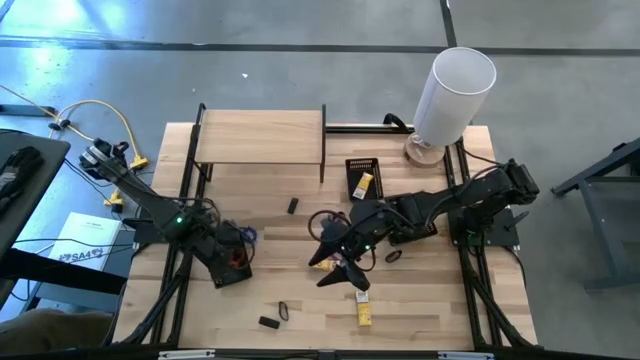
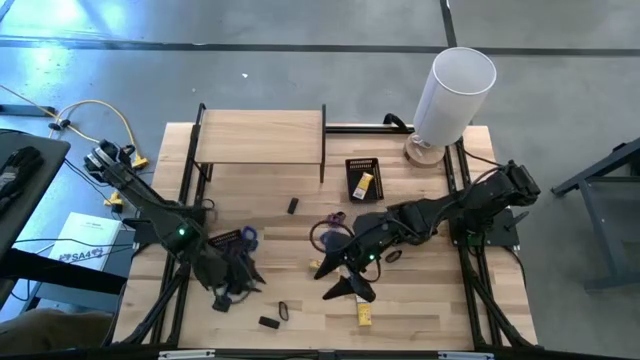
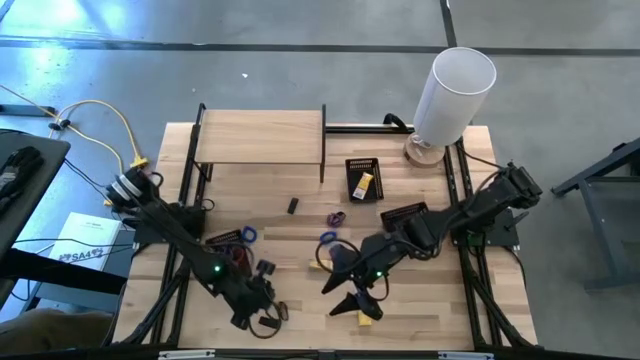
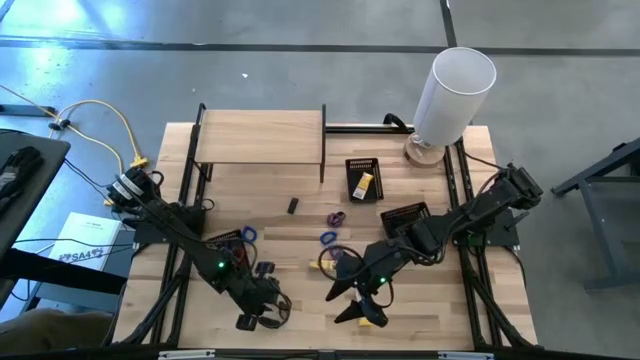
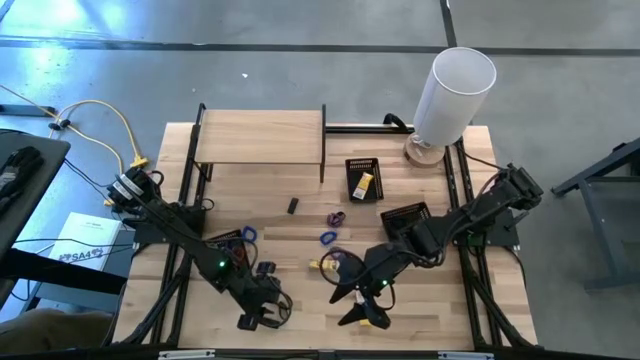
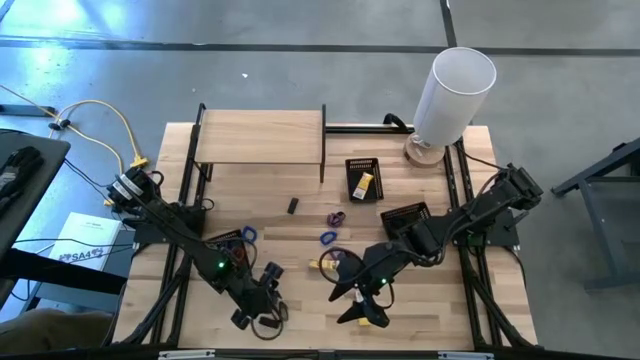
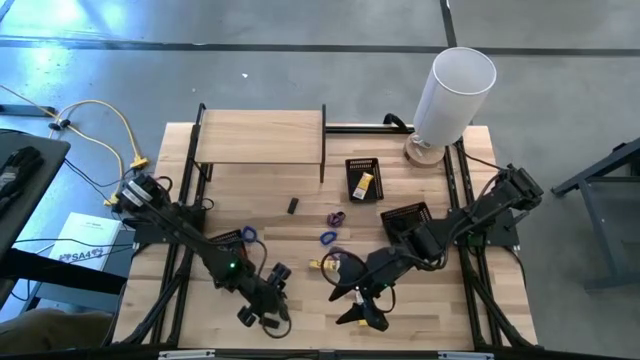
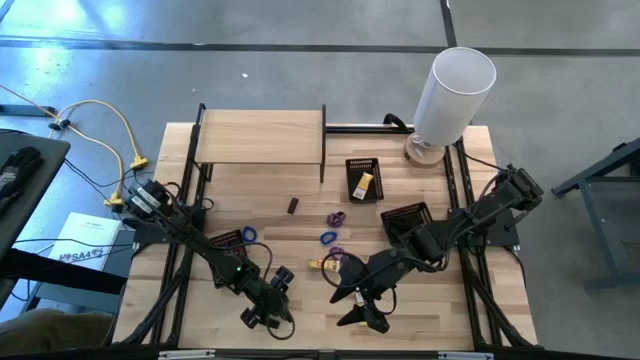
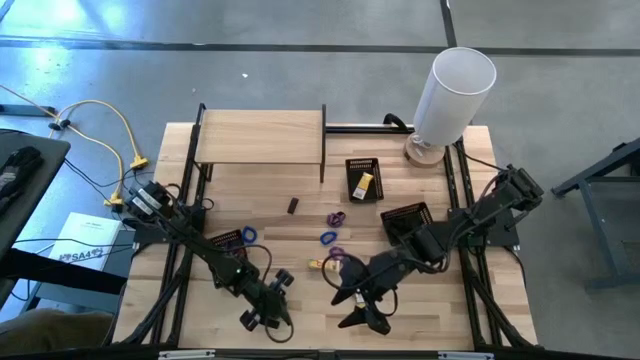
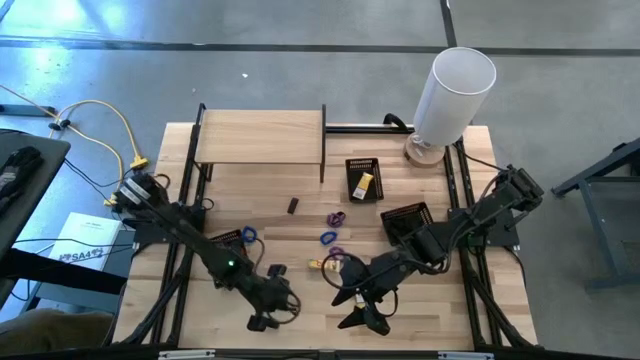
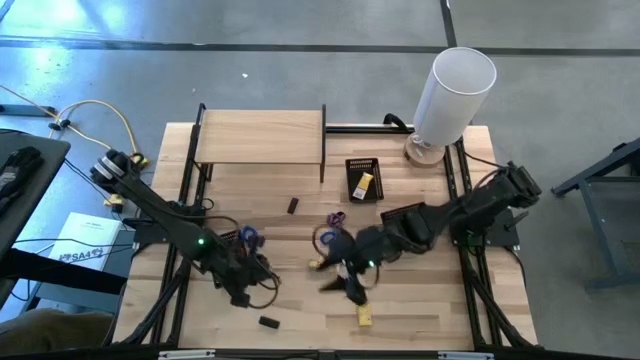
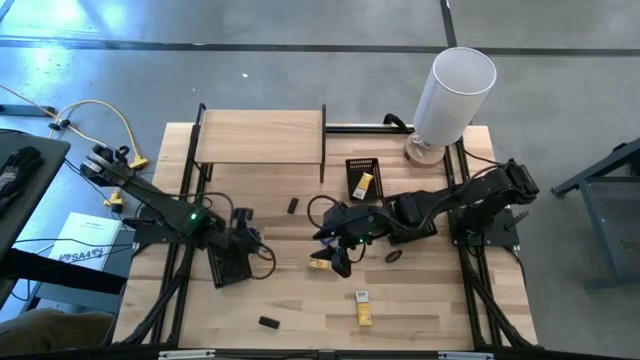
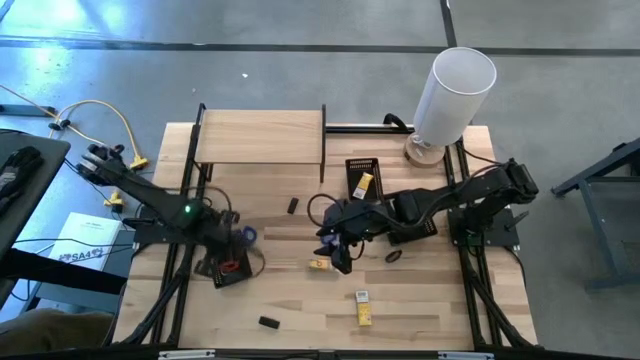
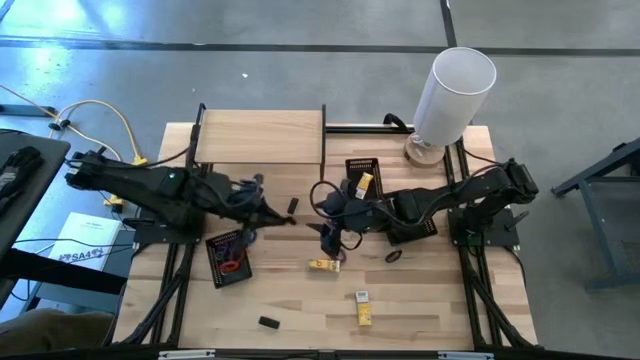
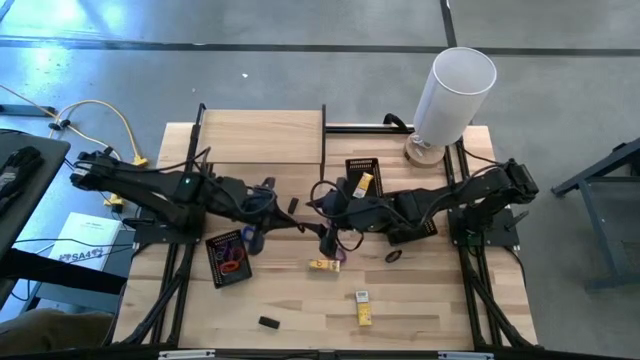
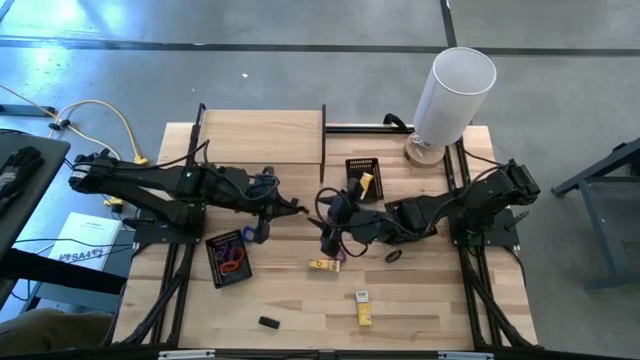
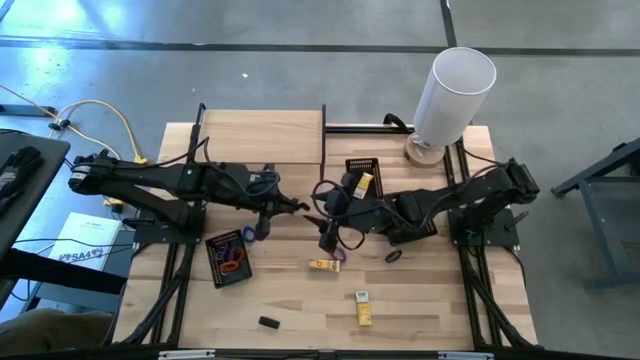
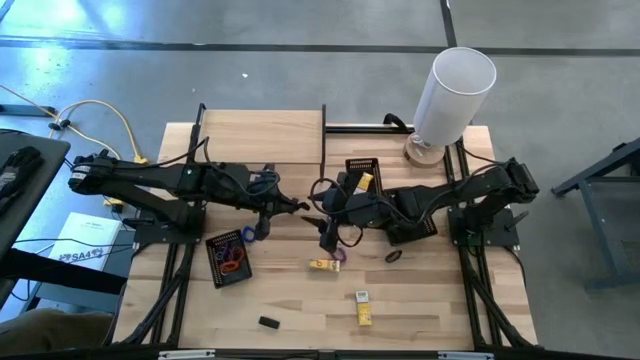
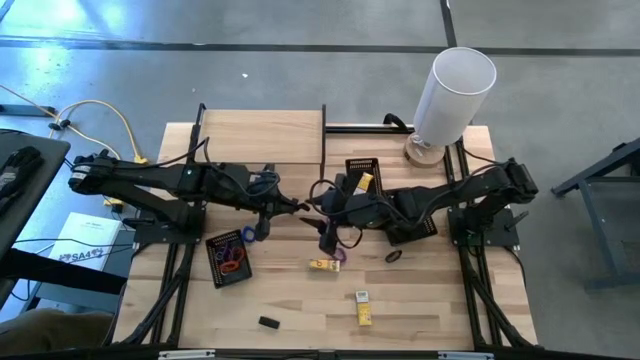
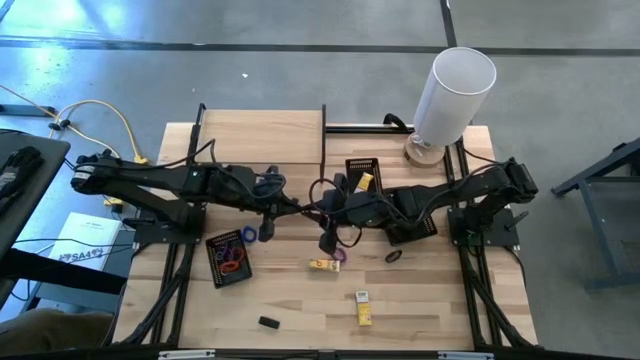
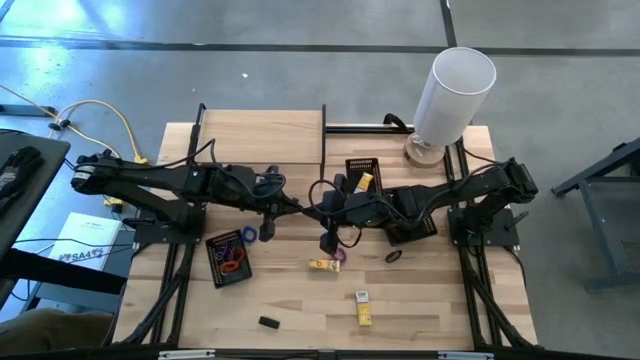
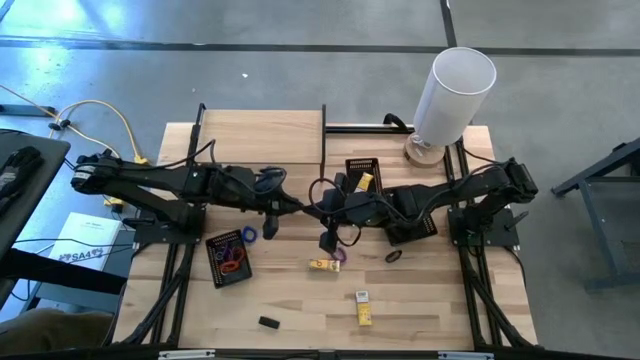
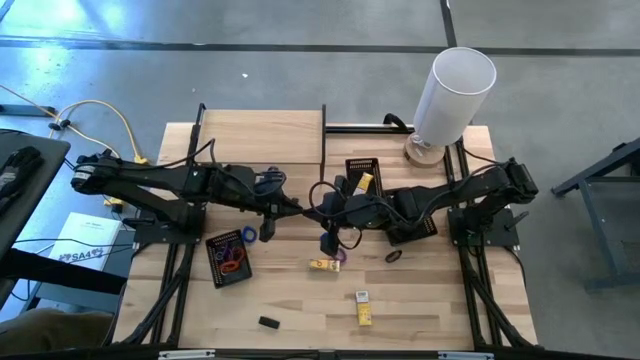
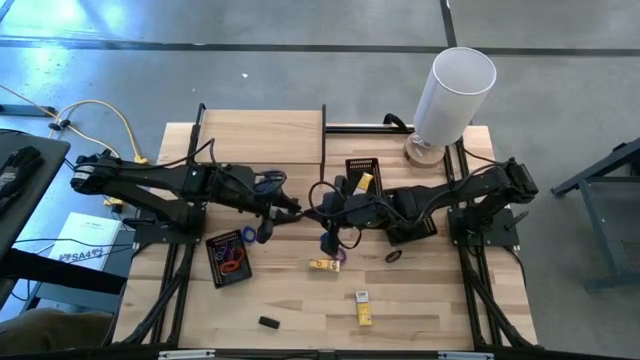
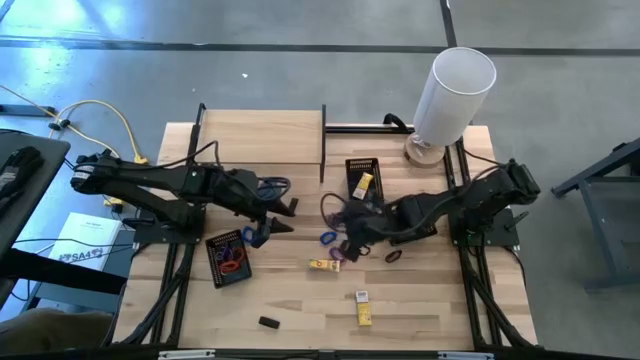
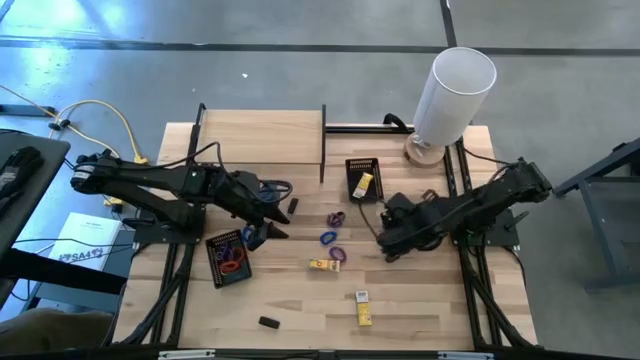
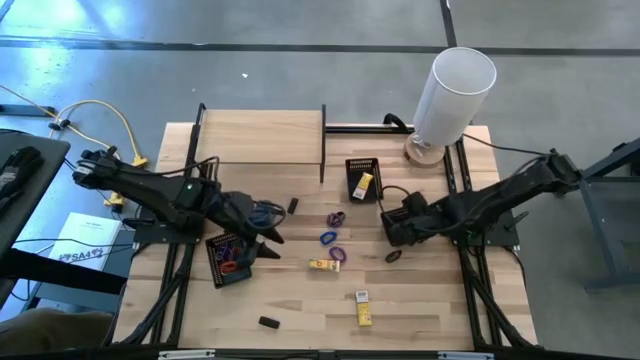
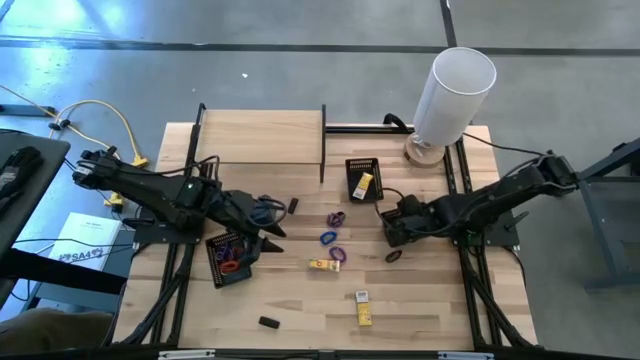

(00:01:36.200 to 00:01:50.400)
Task: Pick & Place Office Desk Supplies
Put the black rubberband into the bottom right black bin

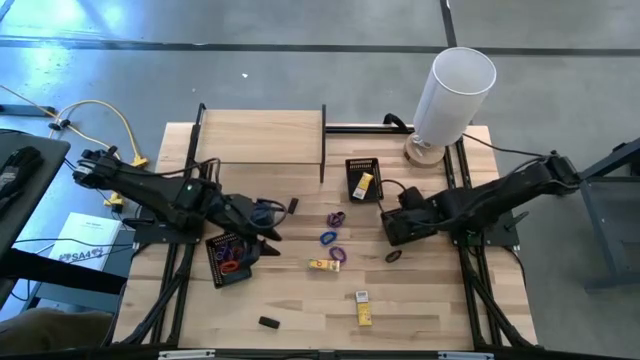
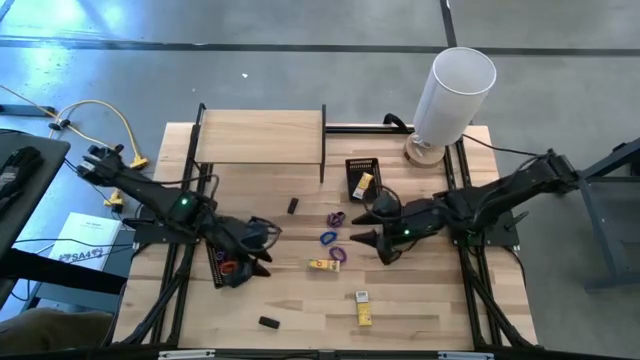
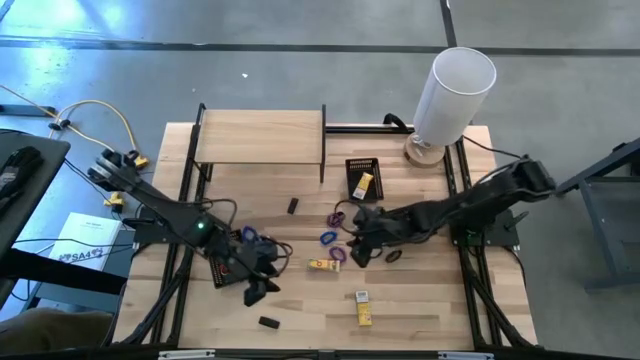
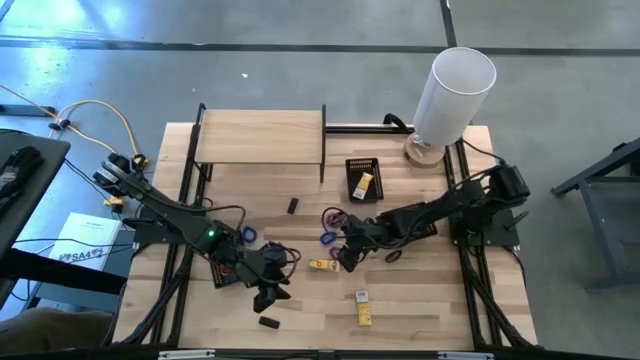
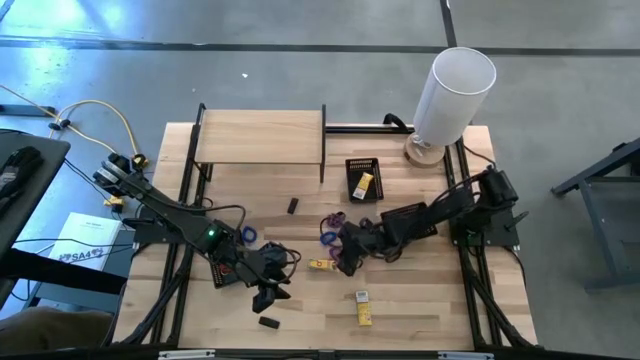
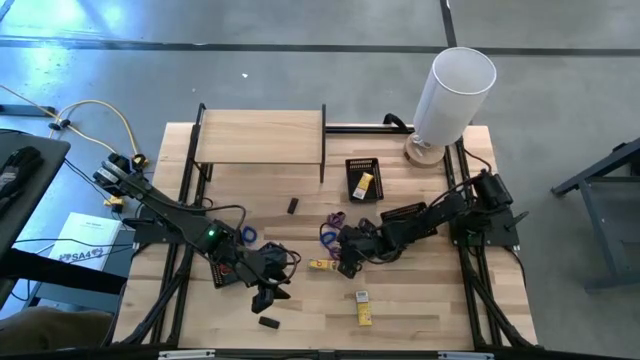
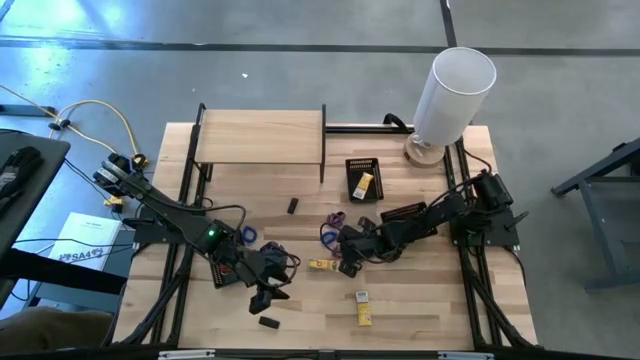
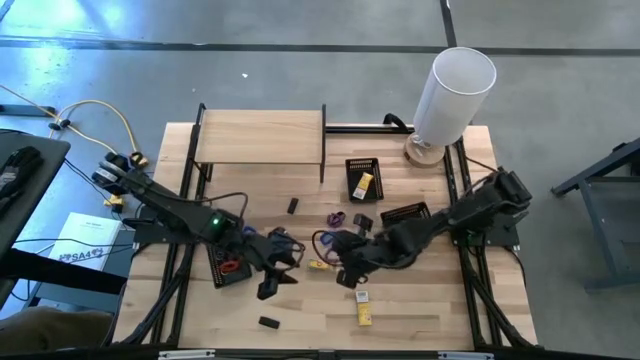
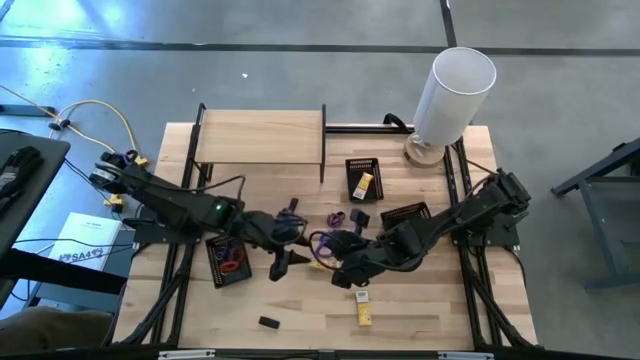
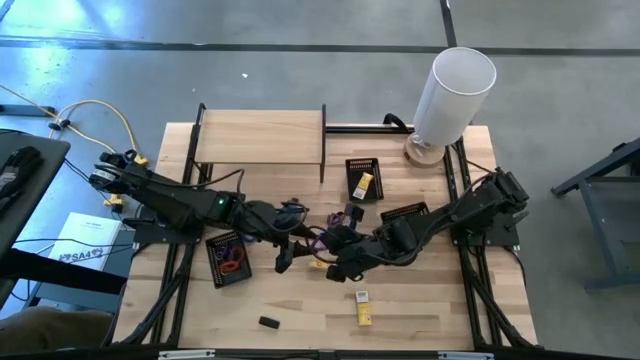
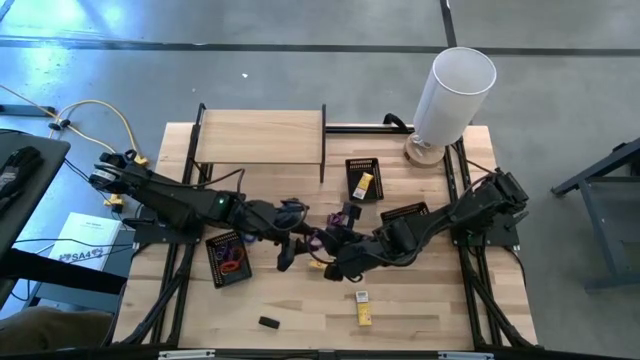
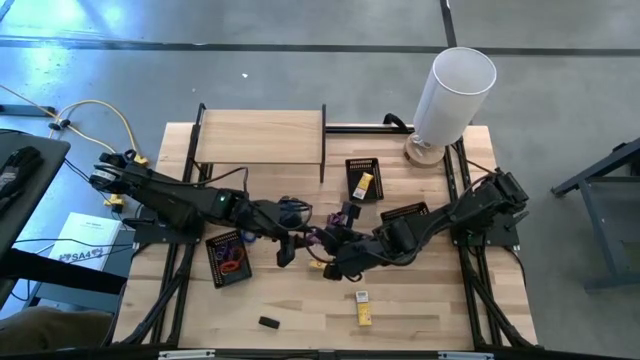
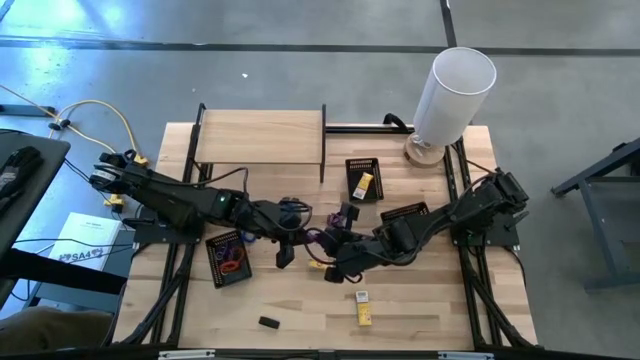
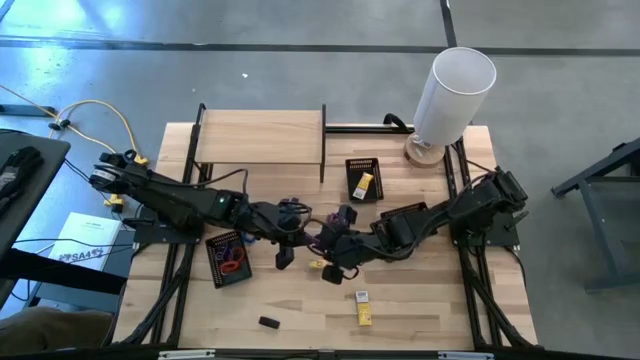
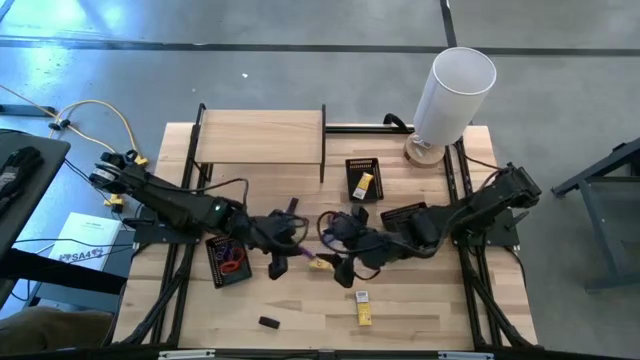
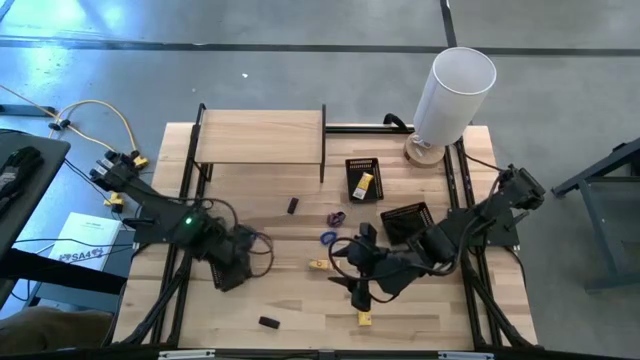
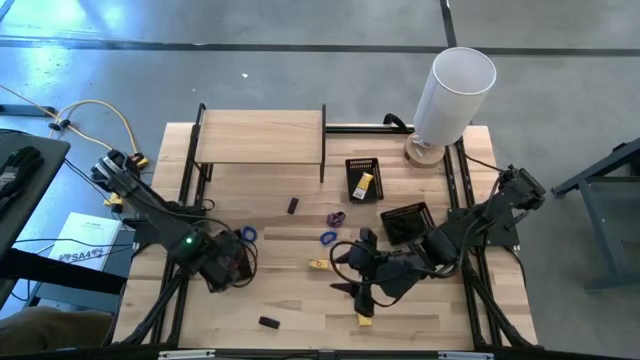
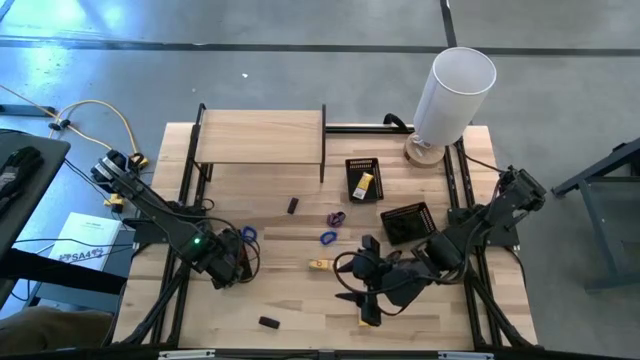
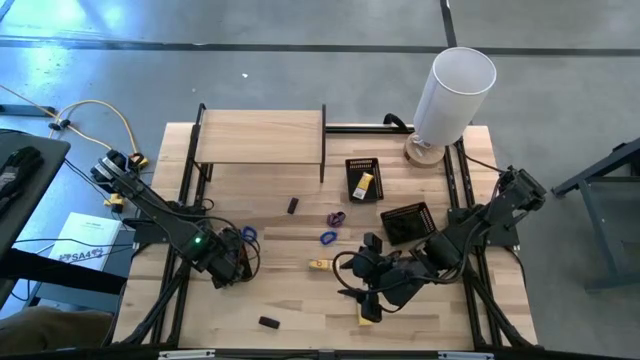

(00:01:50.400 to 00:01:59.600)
Put the purple spring keychain into the bottom left black bin
